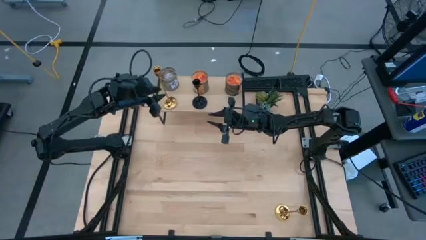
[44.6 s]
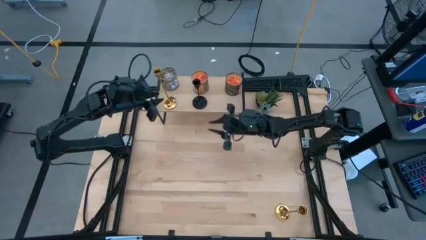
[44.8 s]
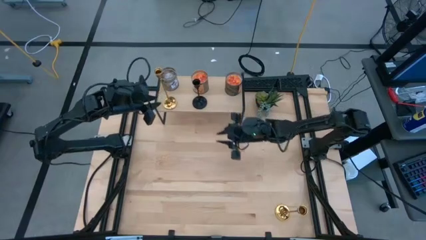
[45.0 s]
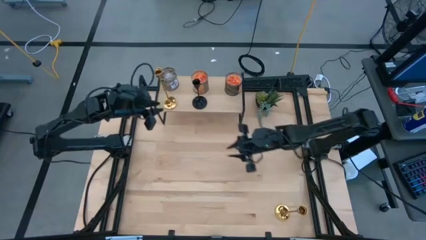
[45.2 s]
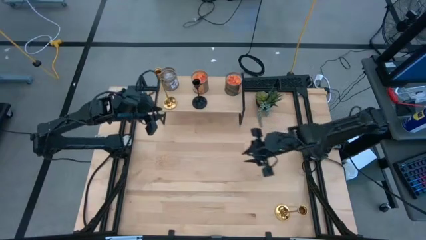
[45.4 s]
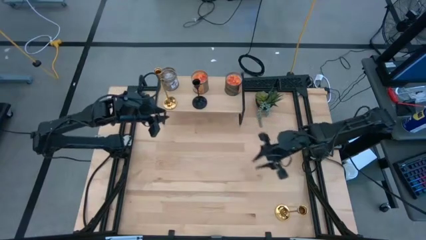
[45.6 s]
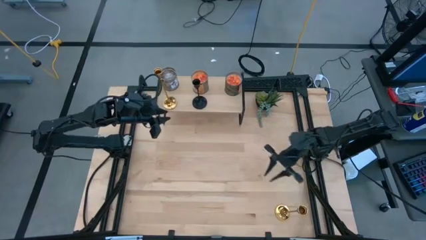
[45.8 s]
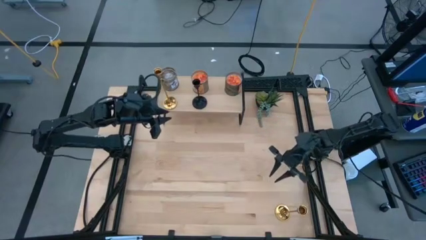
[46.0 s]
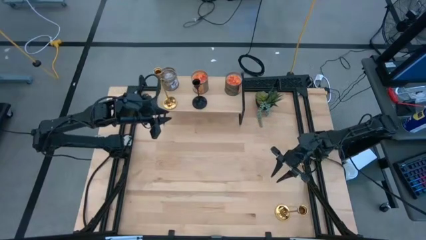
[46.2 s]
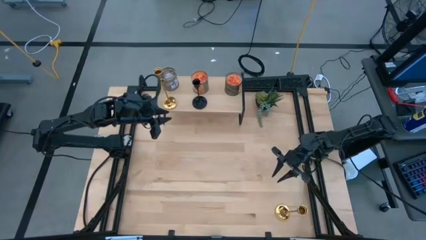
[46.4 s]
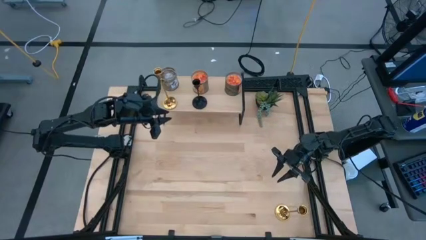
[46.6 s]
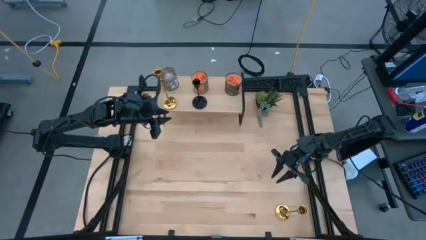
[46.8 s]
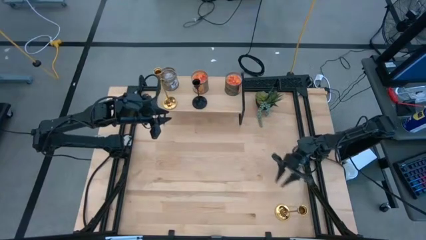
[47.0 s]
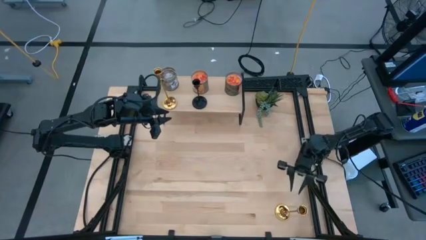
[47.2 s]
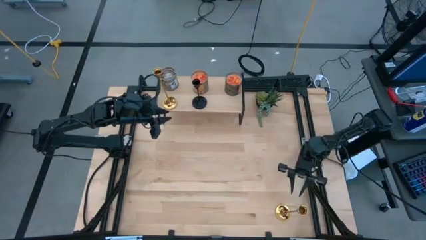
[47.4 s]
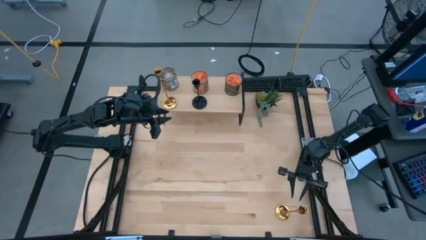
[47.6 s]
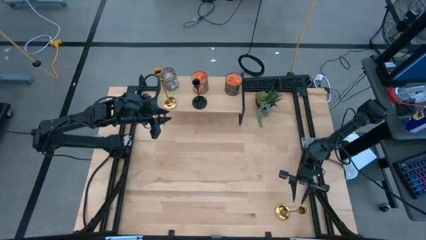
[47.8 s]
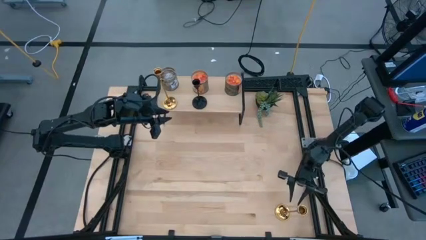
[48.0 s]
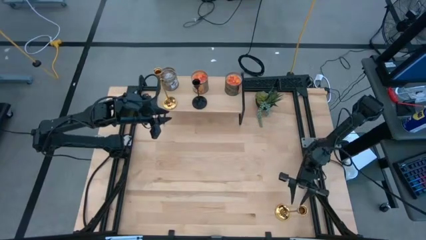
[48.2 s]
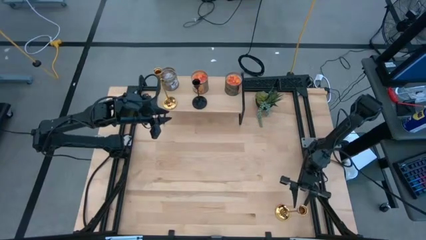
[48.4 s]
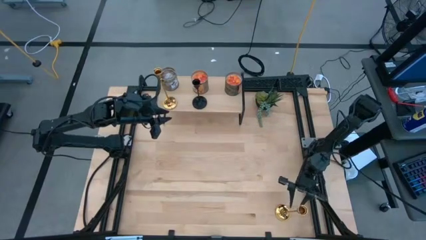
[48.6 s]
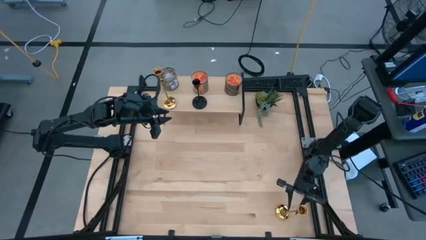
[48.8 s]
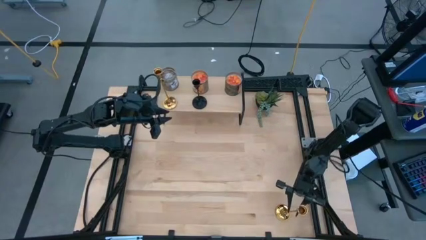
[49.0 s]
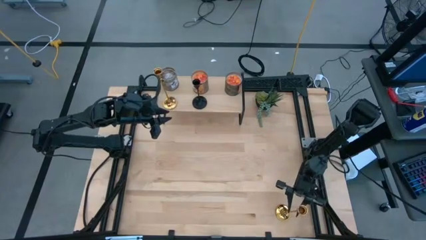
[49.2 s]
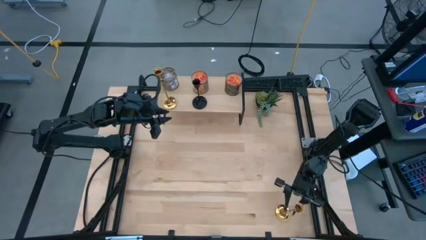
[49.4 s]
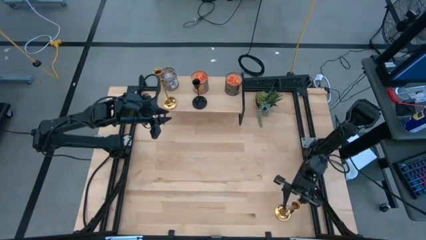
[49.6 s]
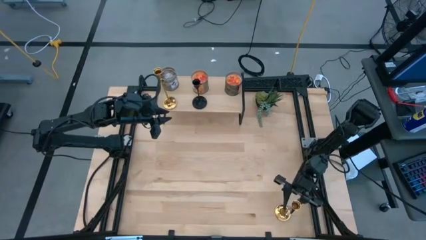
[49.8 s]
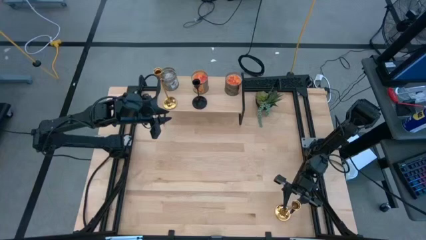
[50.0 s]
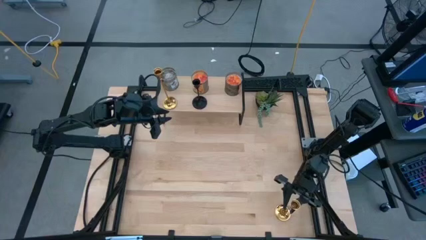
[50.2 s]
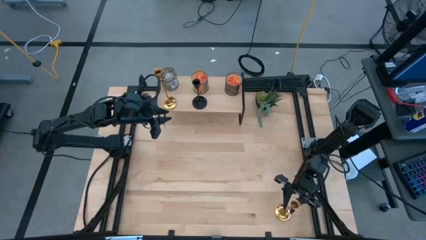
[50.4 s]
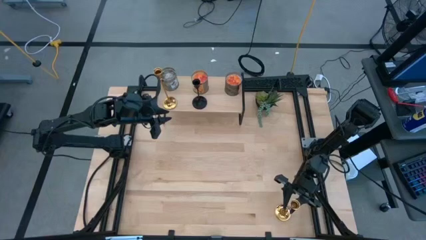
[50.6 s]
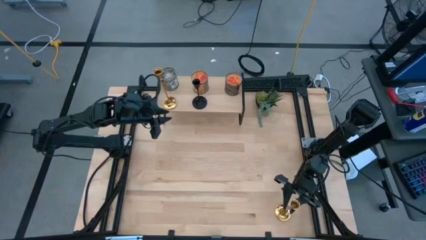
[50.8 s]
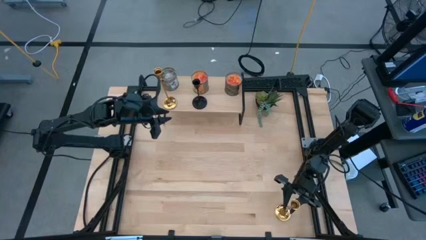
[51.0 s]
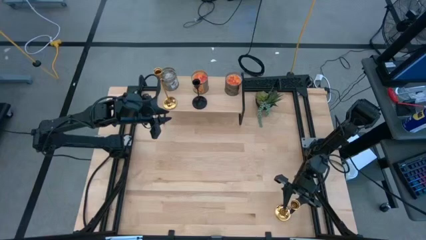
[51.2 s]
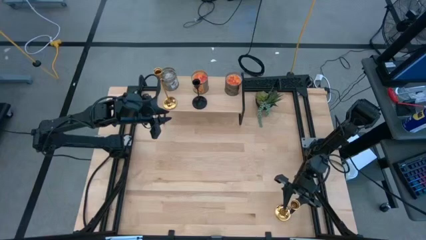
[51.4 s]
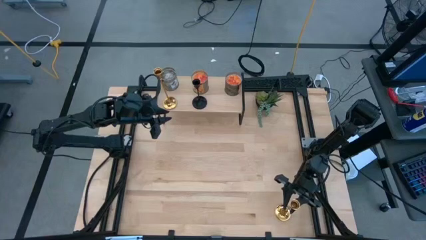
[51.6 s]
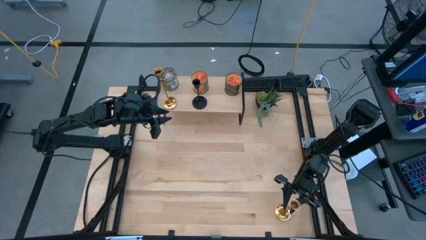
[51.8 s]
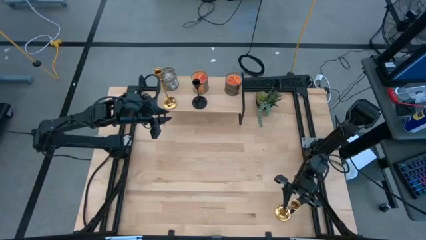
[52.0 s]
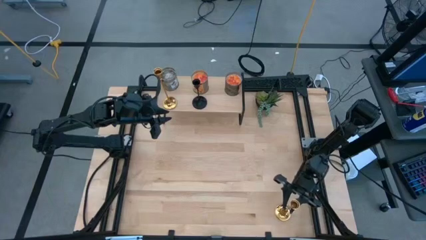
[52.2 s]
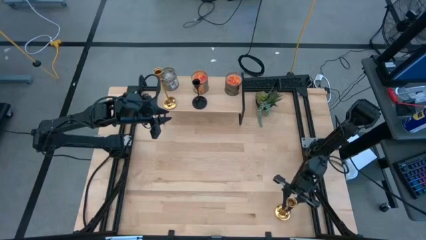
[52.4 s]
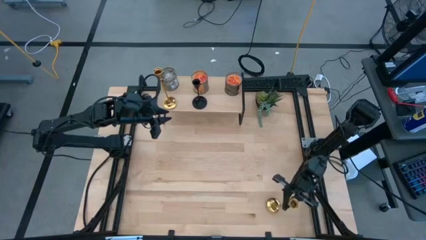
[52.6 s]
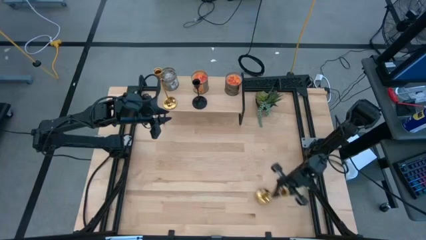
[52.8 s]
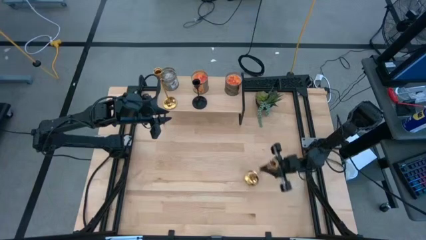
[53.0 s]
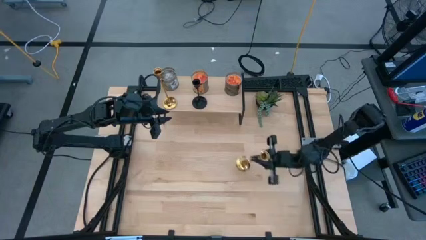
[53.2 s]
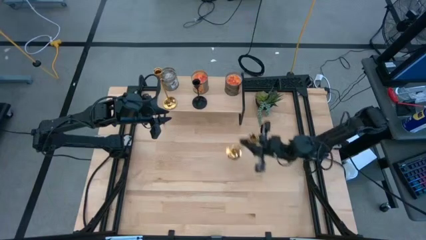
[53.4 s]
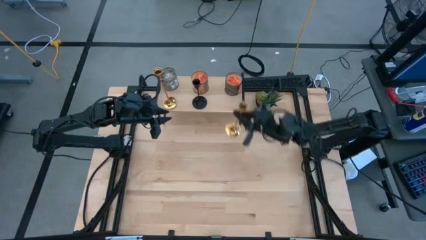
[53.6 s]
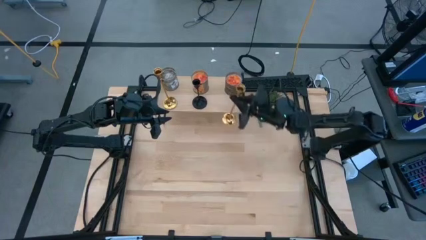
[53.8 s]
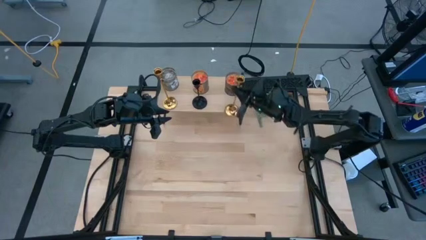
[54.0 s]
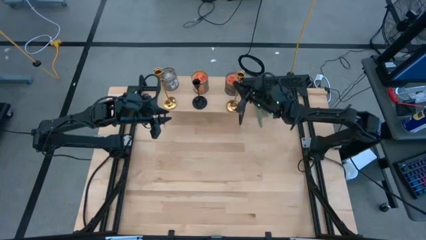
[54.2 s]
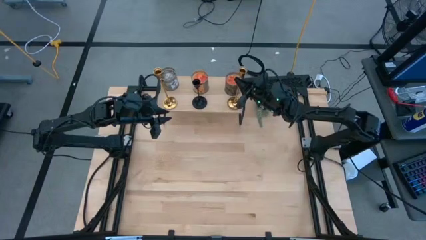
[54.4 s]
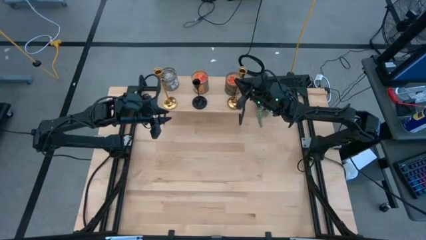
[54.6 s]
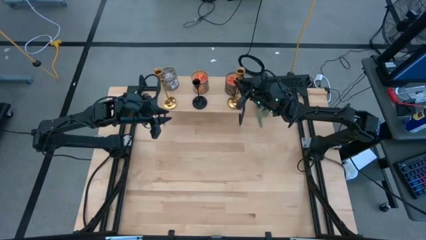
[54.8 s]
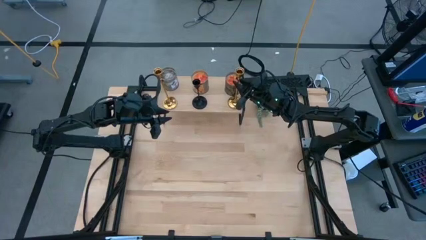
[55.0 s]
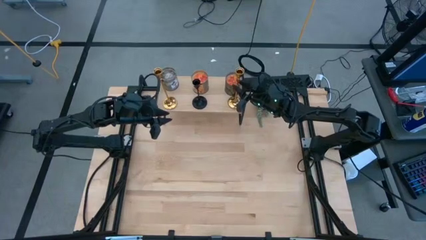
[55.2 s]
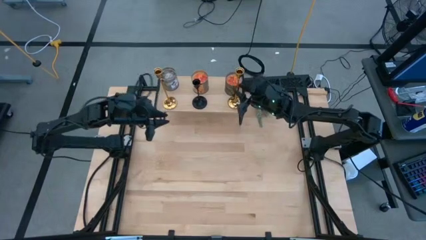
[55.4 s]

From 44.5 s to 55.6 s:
Task: Pick & Place candle stick holders
Put the golden candle holder on the shelf

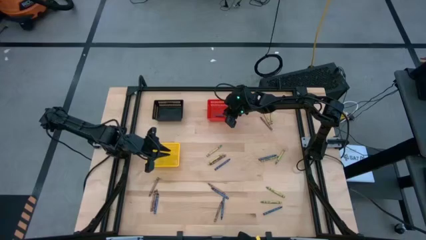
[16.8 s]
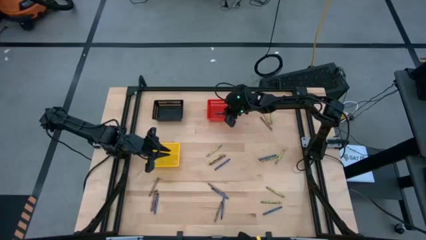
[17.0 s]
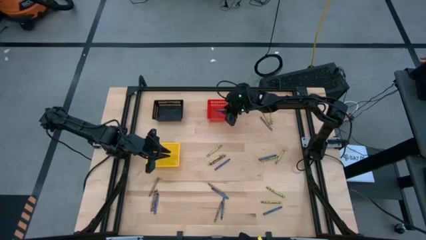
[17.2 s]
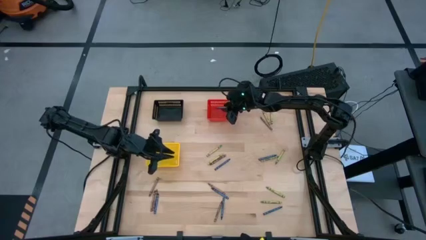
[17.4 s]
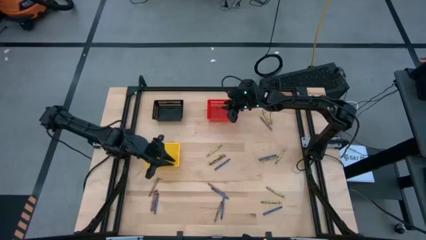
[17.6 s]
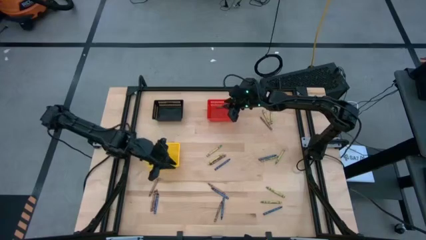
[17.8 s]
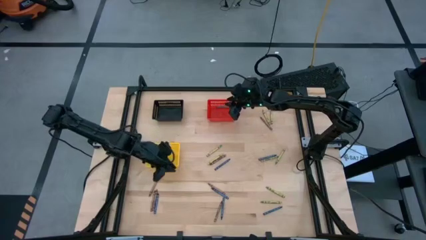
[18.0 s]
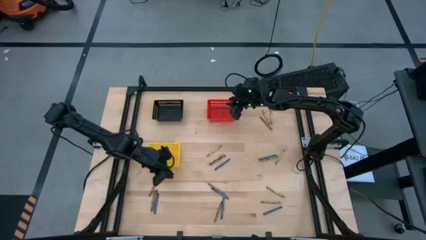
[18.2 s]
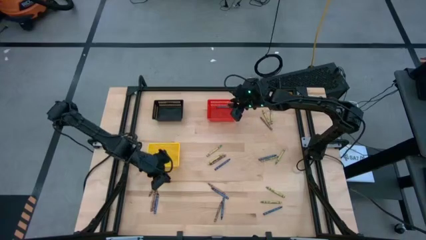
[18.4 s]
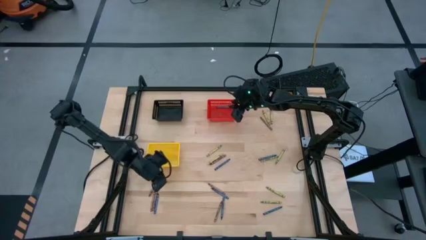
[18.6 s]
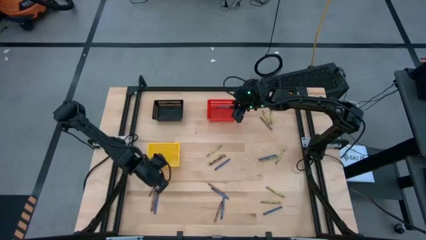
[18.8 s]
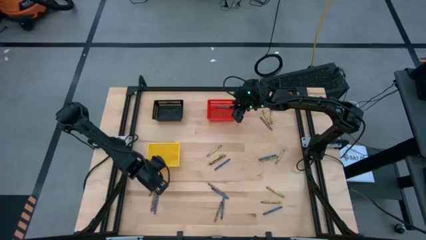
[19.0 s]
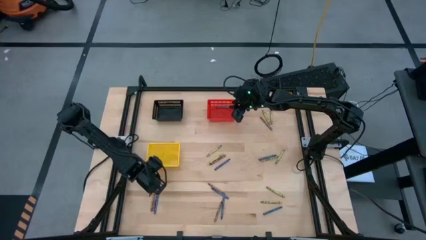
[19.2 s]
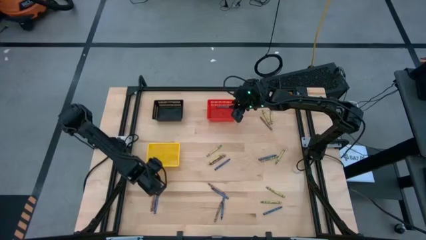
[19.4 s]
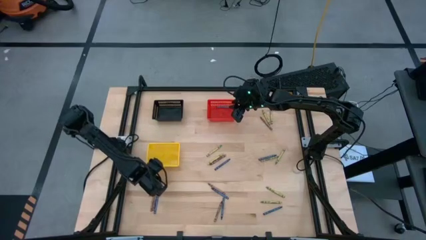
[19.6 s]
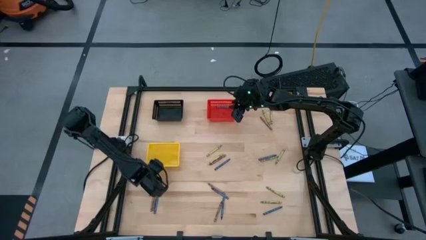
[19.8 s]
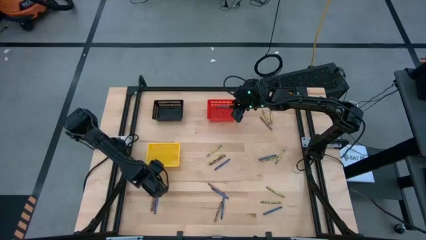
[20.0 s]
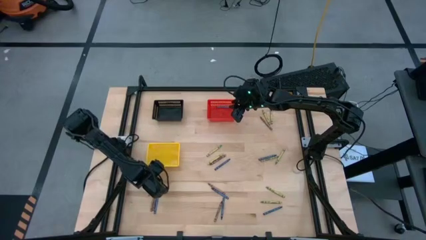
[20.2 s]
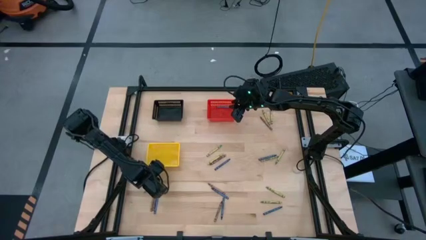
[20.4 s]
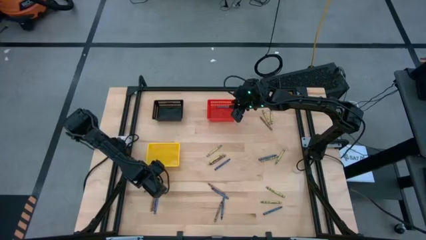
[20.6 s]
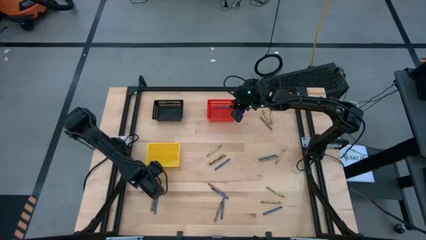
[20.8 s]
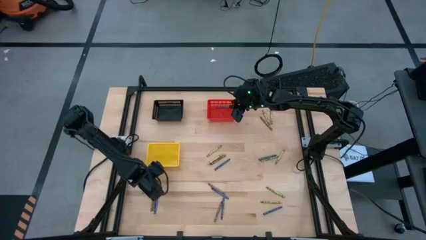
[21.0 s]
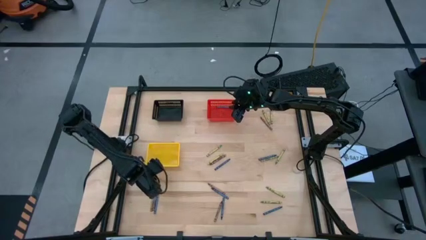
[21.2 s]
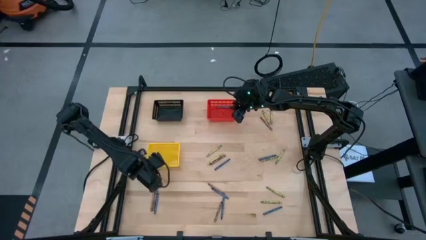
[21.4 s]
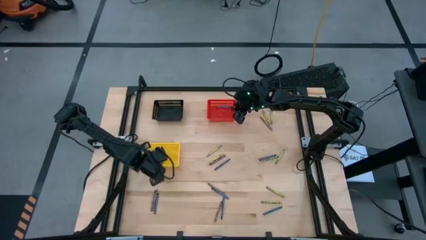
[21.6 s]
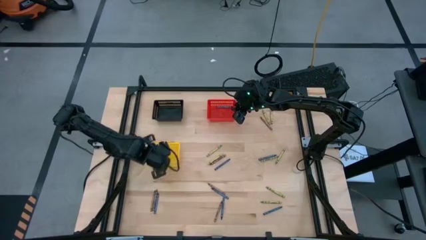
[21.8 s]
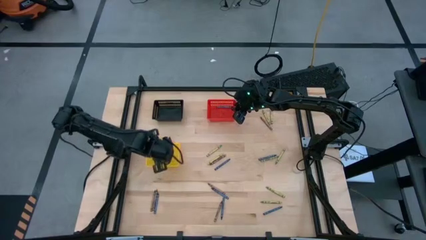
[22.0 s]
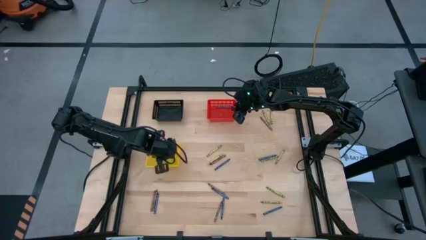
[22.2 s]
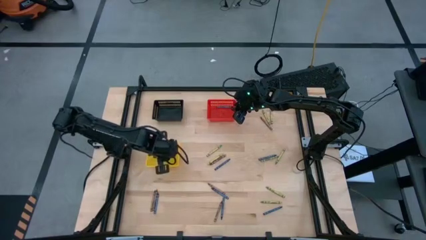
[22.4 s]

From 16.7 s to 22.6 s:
Task: Sort crayons
Put the brown crayon into the yellow basket
